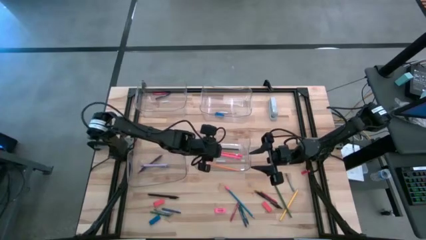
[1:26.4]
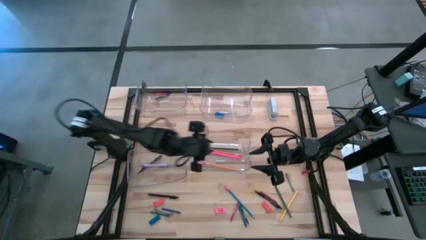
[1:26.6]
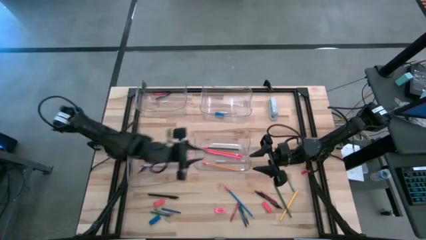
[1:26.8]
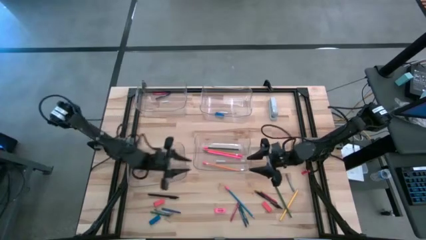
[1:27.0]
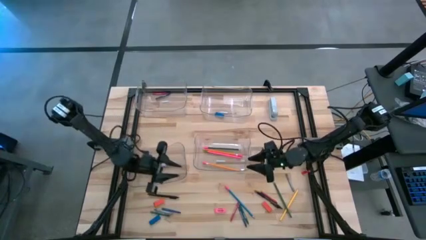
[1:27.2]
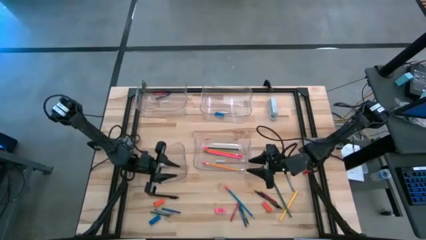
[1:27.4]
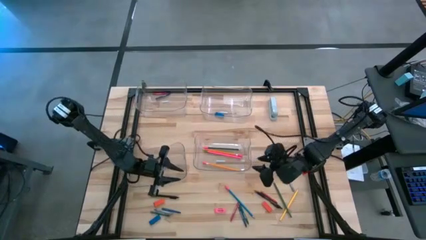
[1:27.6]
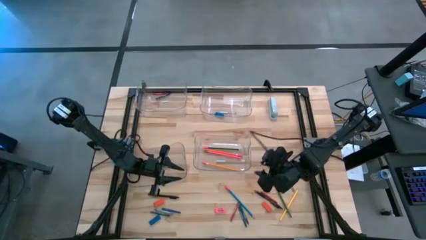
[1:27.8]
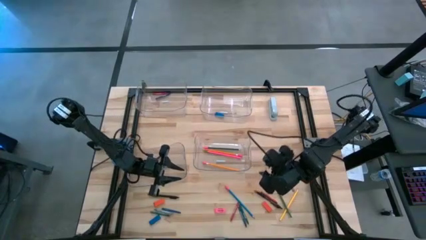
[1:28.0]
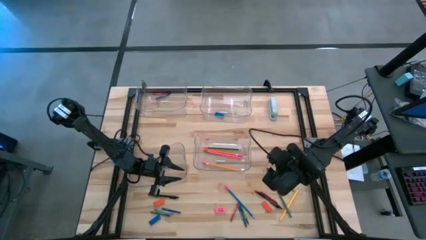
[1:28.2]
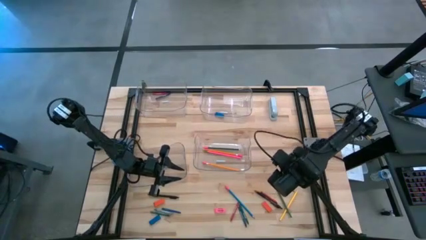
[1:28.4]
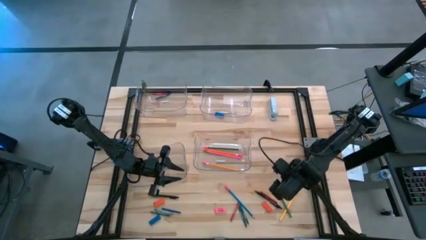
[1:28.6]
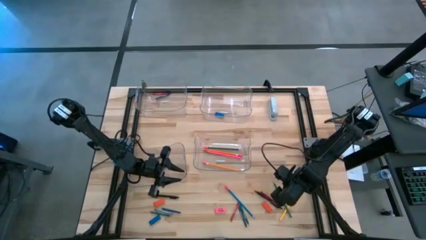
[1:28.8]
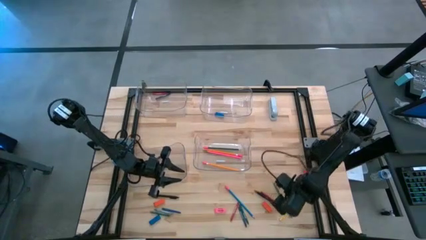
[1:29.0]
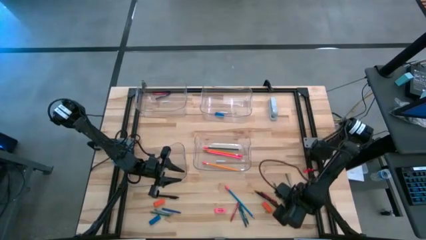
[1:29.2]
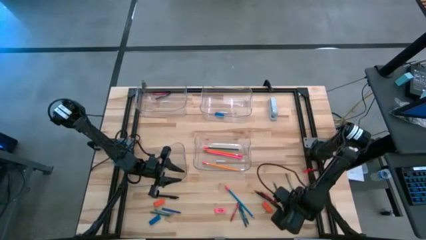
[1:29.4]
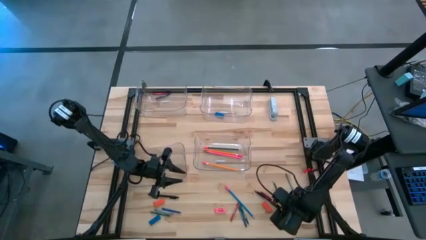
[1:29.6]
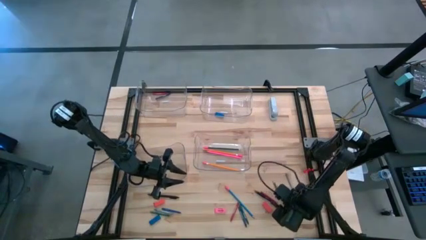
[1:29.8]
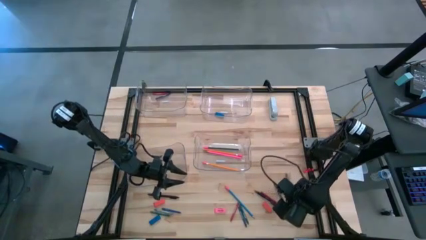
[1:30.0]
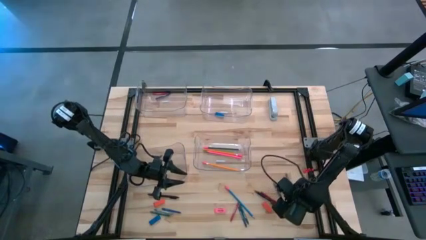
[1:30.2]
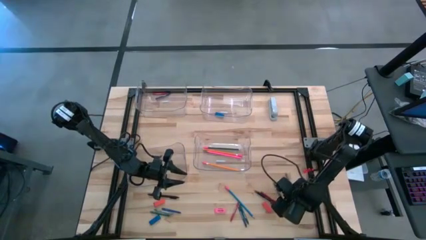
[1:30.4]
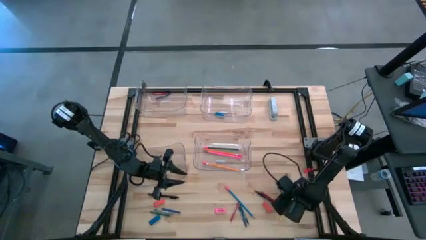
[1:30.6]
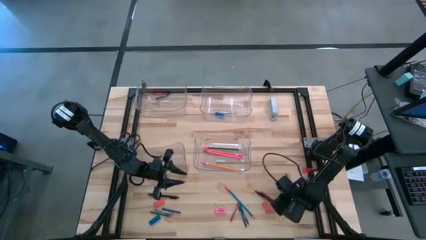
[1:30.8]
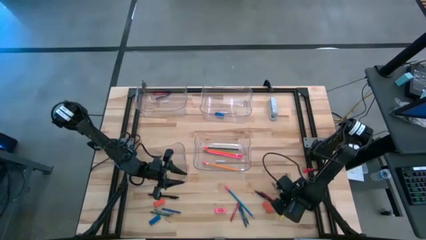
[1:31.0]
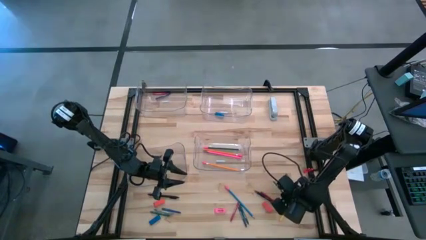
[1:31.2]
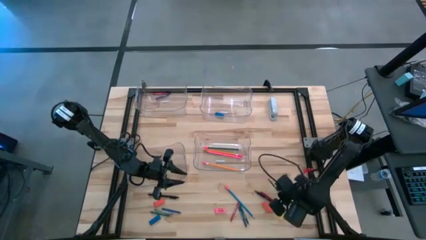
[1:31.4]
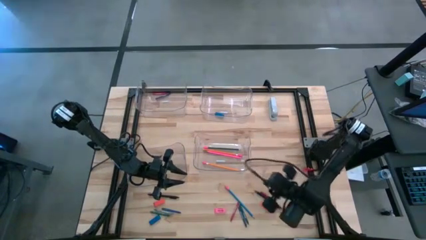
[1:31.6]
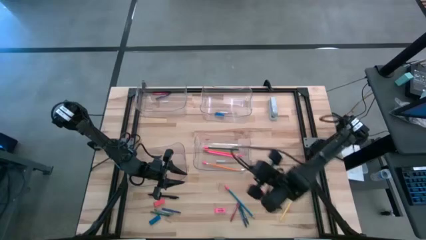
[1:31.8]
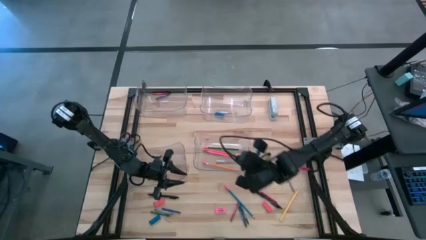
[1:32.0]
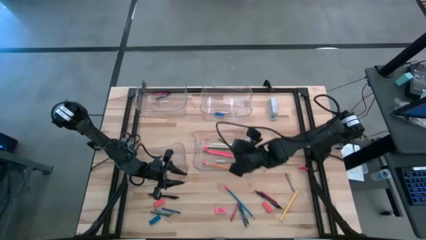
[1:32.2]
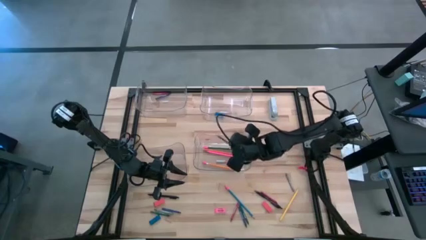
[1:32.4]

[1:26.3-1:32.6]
Task: Sort crayons/erasers/pens/pencils in bins
Put the green pencil into the bottom right transparent bin

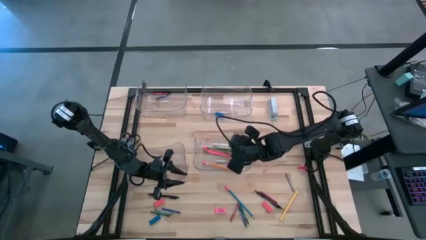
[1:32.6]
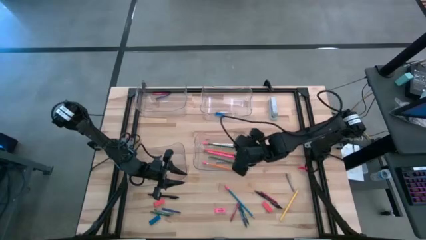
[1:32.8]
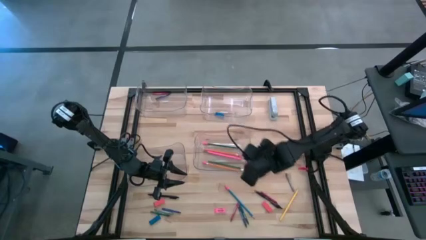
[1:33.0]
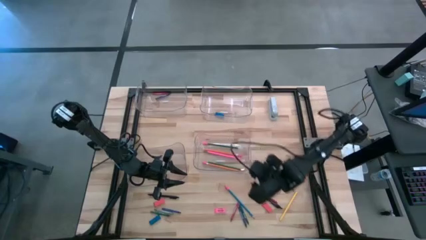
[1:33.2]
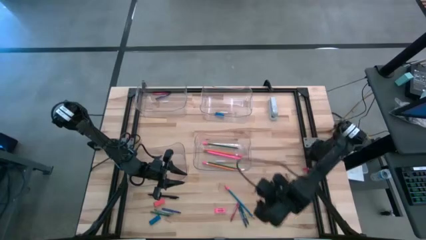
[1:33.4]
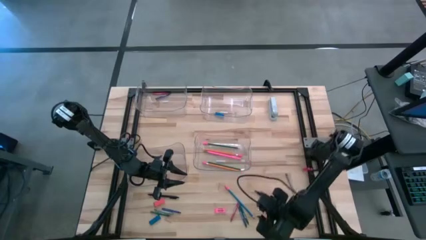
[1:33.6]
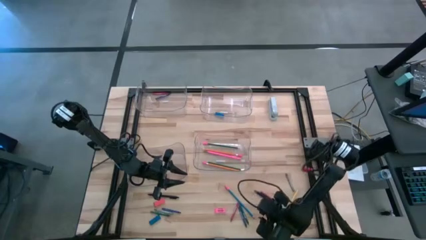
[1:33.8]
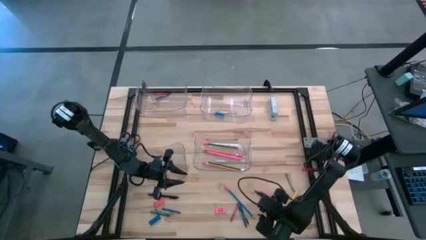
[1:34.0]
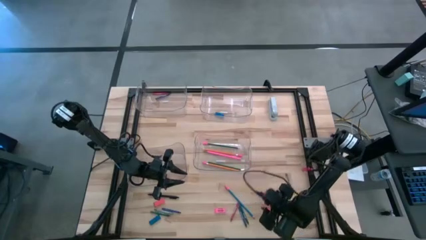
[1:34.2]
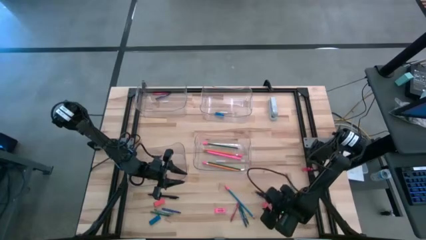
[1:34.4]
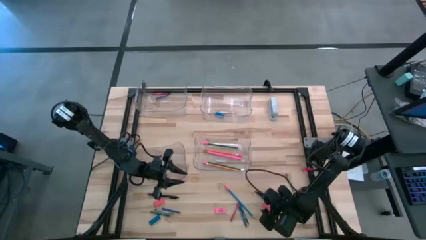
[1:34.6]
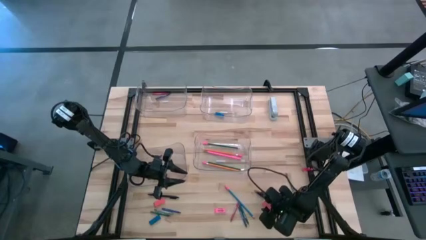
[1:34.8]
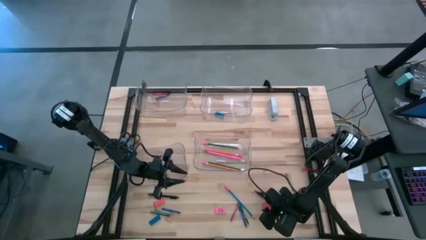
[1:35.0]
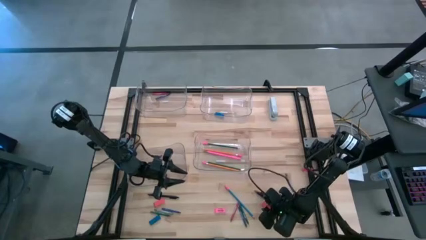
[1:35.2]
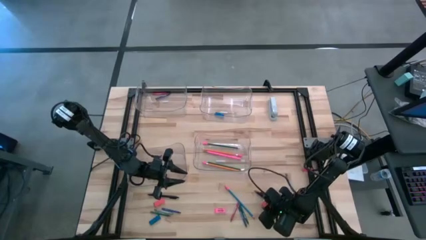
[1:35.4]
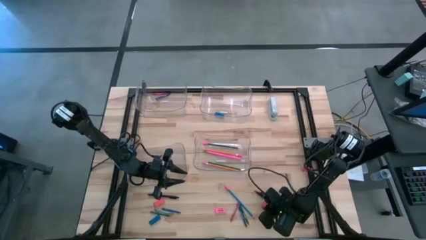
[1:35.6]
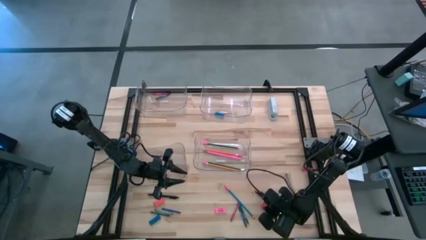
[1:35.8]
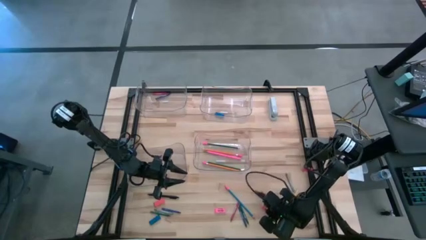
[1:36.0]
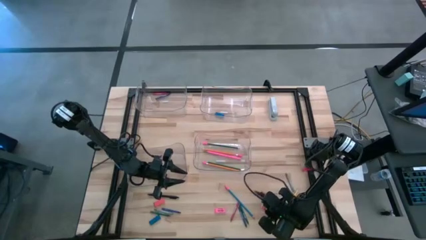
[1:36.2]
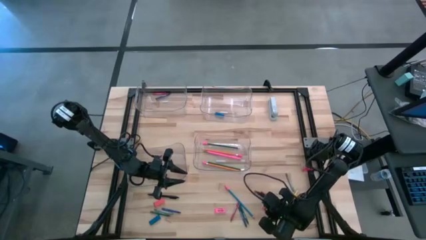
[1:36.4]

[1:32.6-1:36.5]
Put the right orange eraser into the top right transparent bin

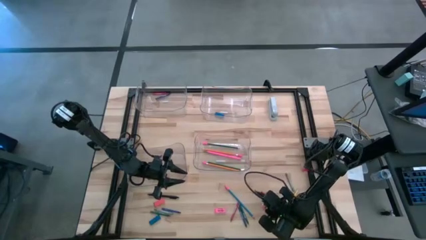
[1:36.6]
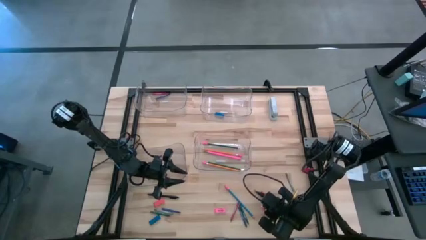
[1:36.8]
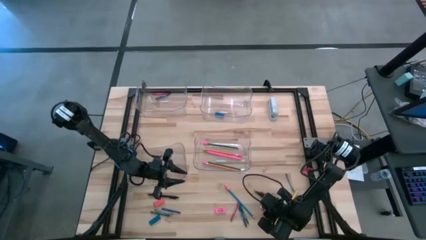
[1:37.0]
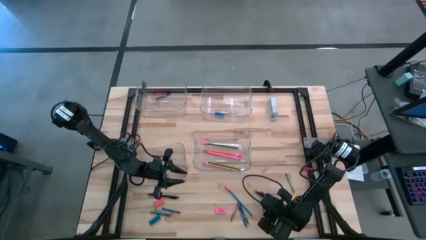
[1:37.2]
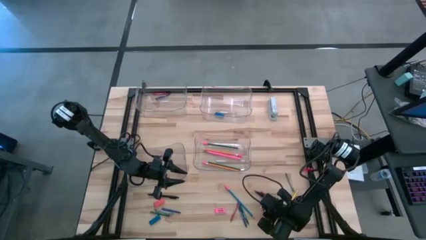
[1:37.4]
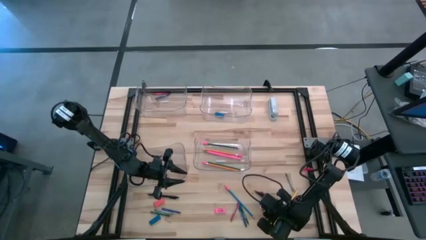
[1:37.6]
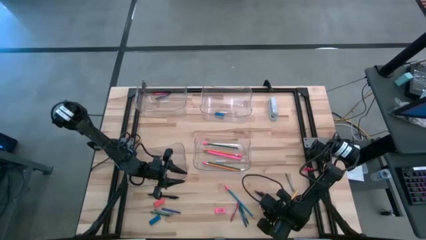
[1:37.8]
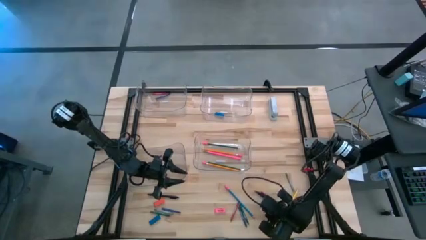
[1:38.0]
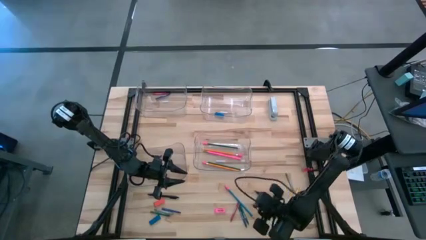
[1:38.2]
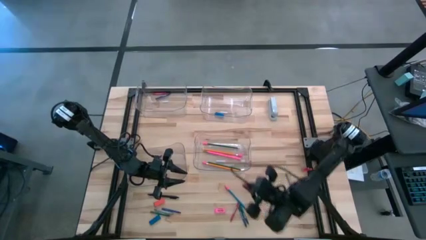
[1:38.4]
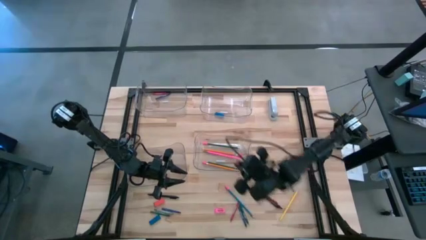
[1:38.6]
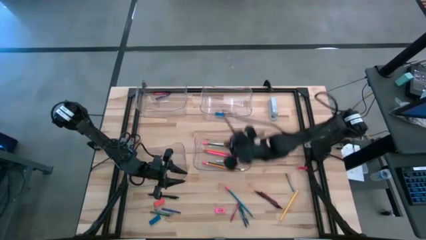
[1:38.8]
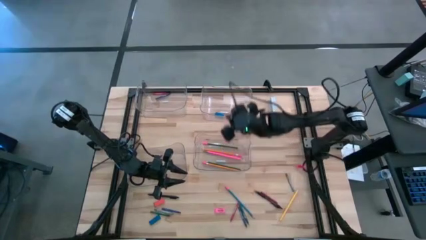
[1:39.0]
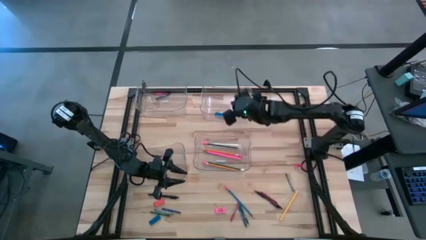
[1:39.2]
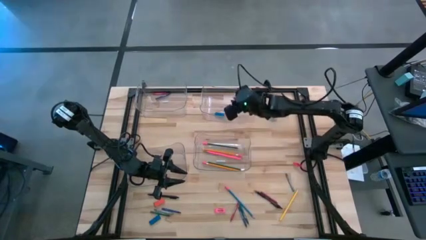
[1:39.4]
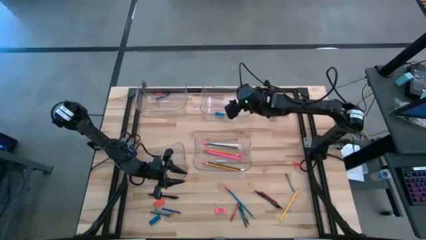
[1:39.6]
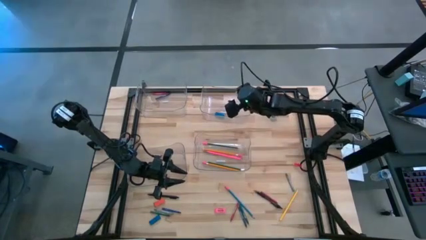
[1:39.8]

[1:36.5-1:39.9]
Put the right orange eraser into the top right transparent bin
